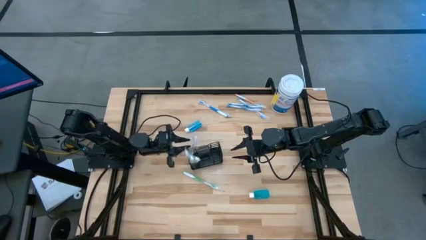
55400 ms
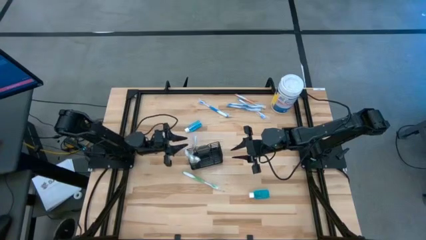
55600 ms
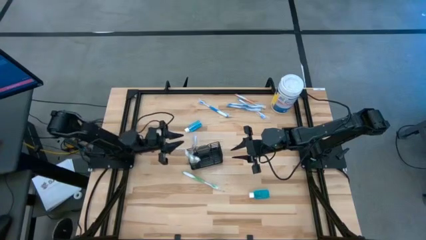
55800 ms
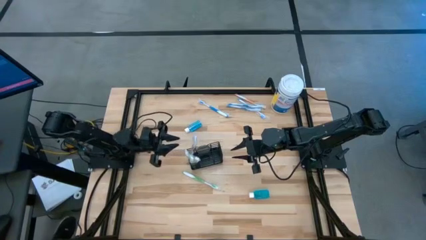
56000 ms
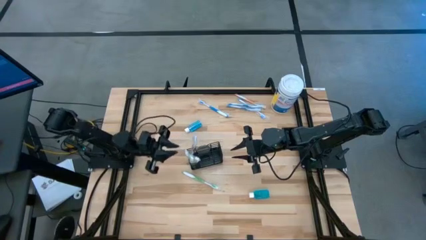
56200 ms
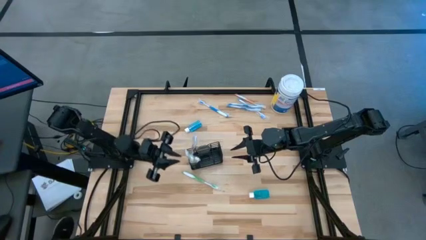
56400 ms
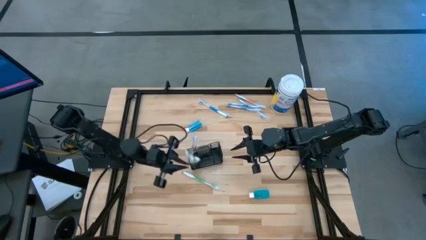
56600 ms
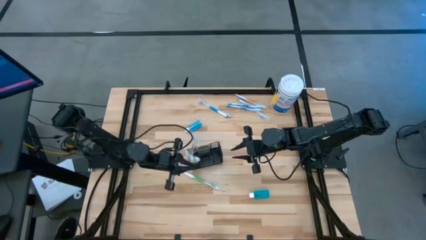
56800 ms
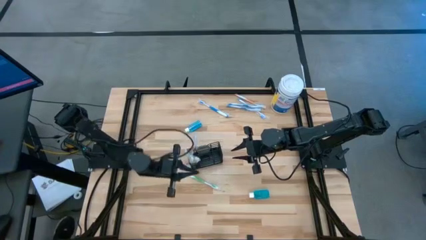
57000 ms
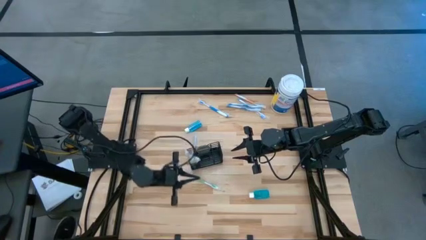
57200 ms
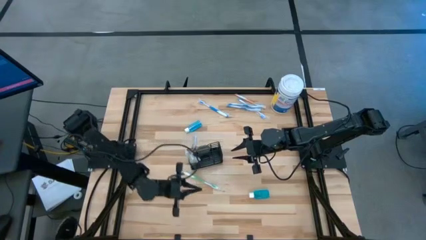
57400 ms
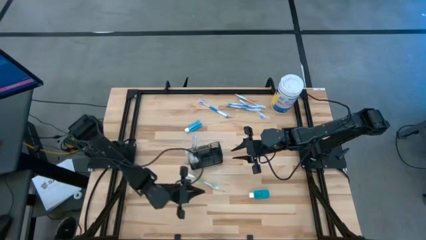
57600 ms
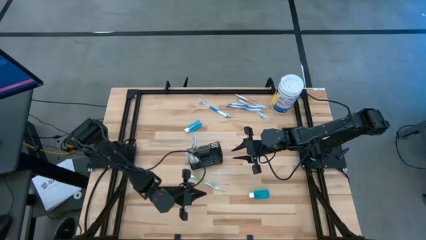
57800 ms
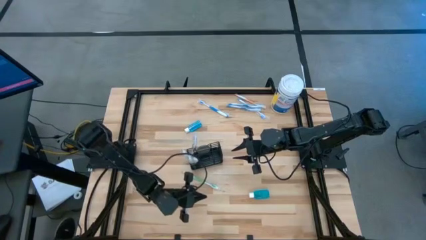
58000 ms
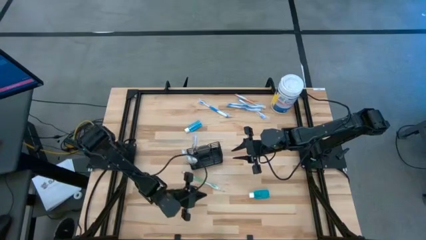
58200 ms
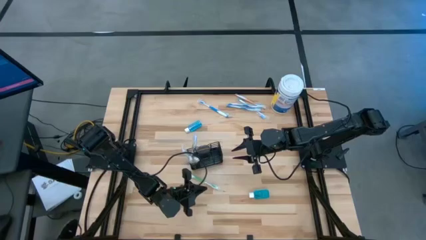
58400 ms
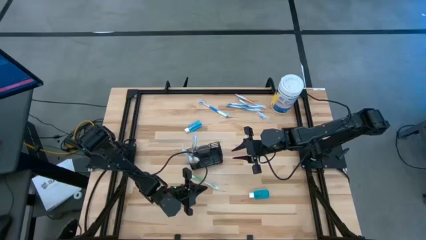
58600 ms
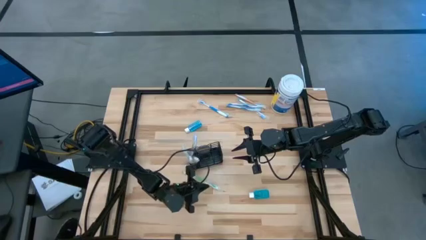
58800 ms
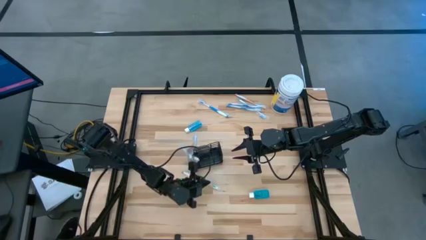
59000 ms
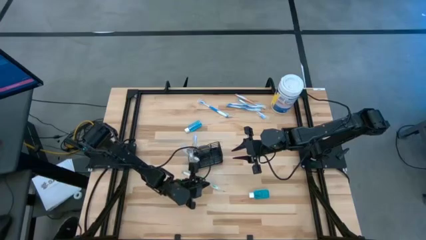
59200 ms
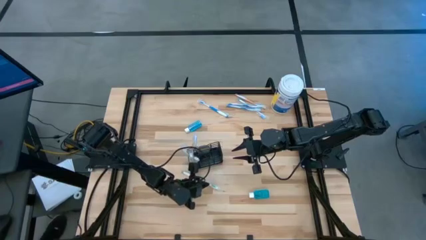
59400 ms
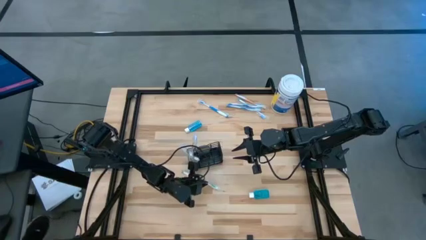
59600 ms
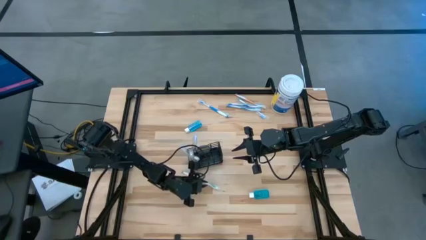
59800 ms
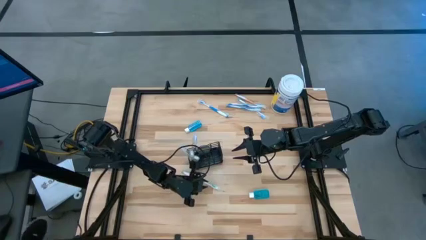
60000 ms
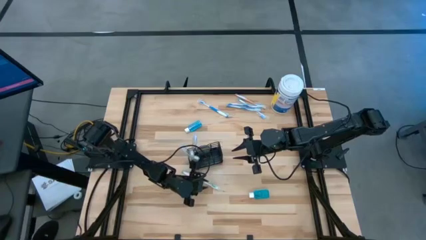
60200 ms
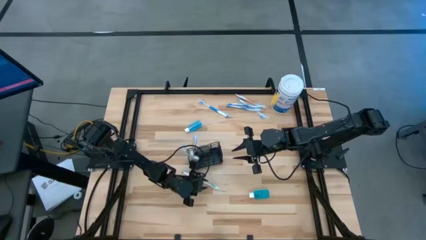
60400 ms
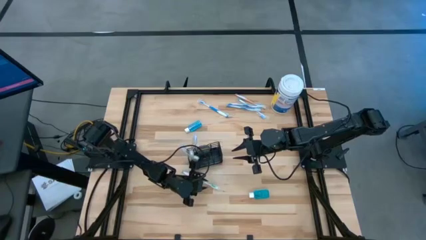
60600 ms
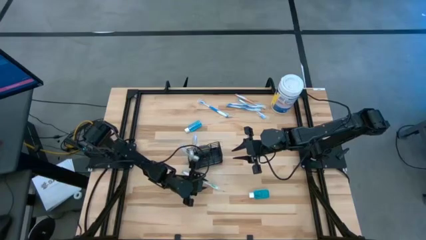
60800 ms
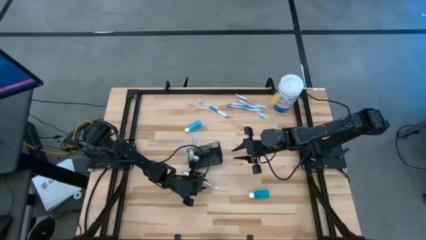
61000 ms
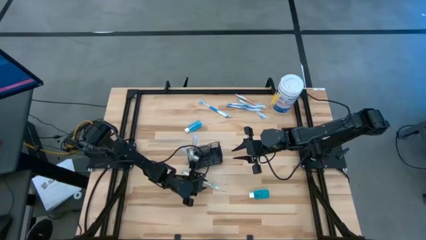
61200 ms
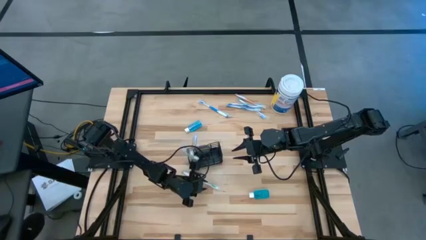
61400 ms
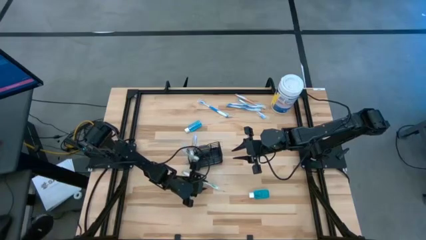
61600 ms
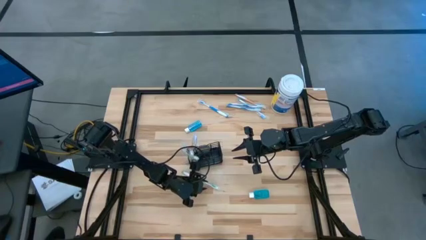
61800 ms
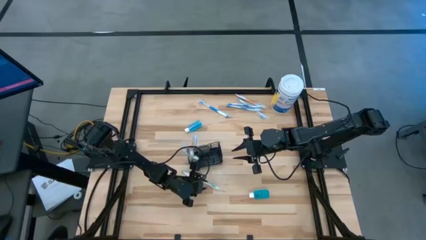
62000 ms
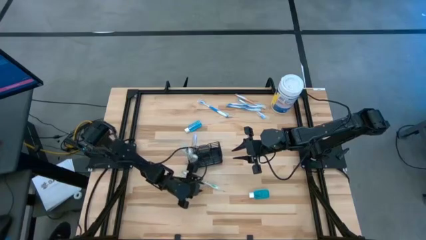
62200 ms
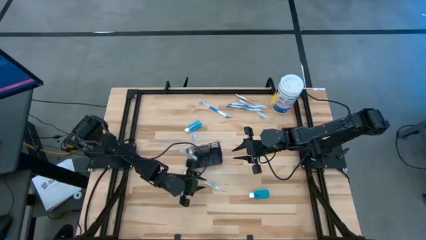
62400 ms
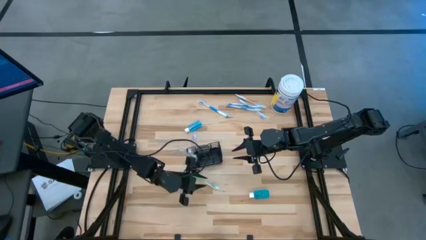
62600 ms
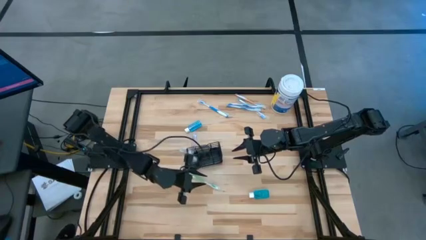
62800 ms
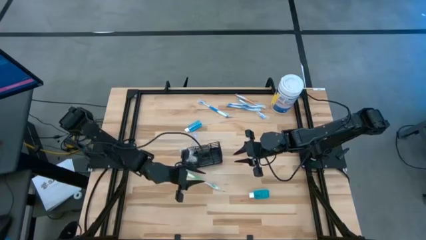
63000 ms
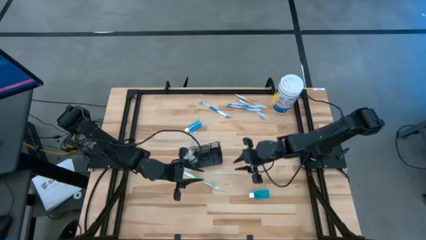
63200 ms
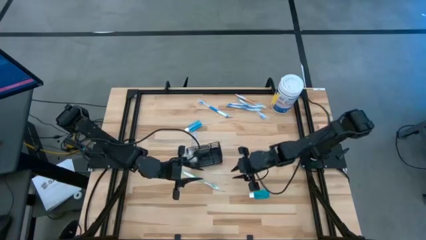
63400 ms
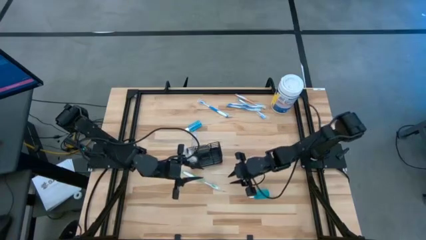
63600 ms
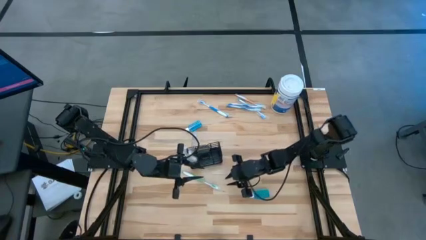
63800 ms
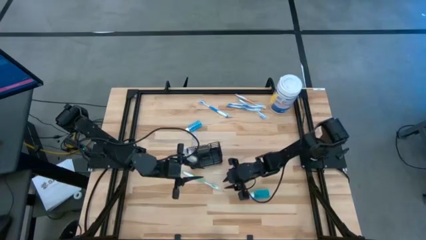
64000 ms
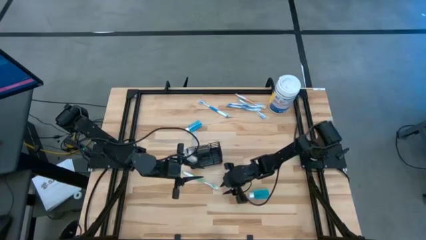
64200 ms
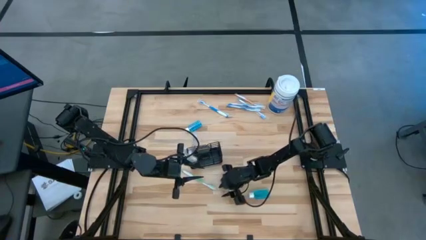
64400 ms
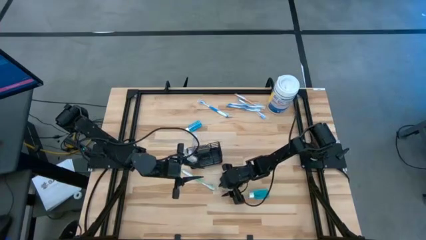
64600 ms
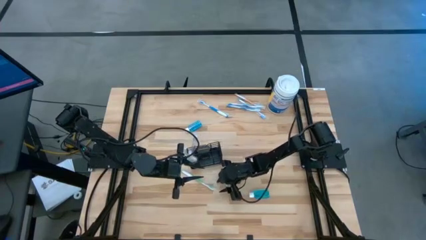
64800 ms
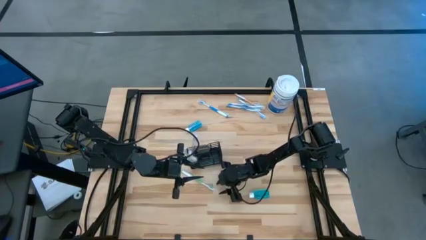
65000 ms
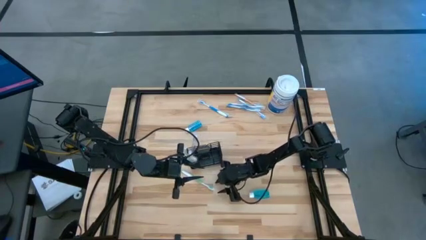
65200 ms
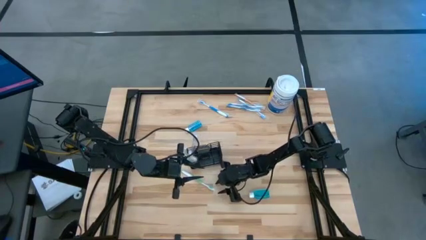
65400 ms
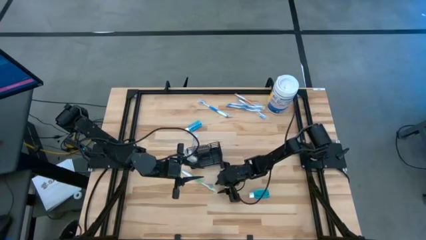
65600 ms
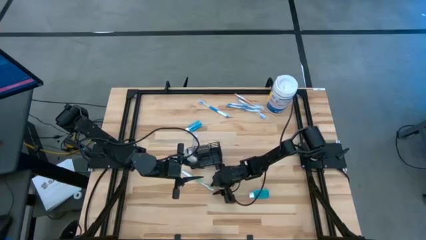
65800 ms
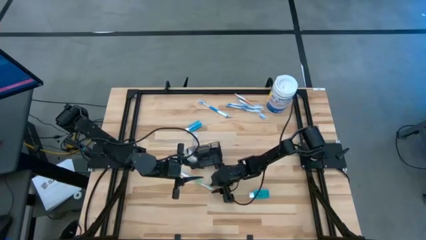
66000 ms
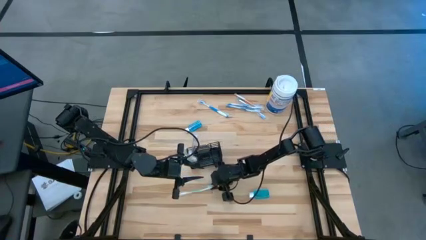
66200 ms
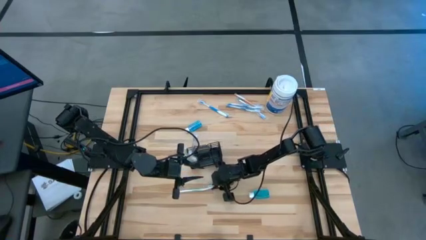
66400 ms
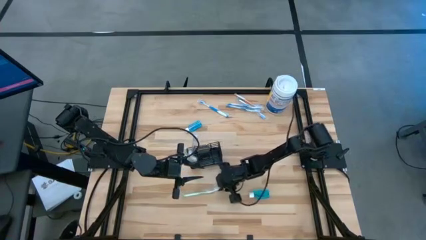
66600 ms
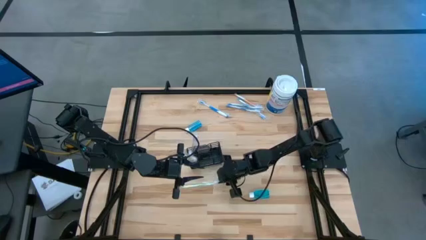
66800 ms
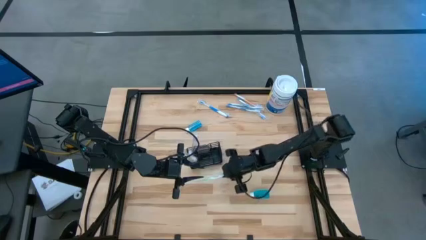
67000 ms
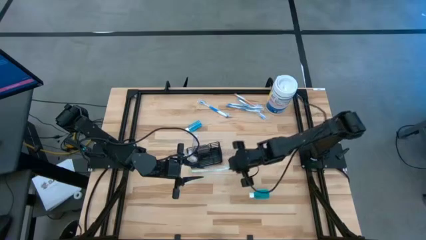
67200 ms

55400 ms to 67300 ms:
Task: Pick & Place toothbrushing station
Put the green toothbrush into the wire organizer
